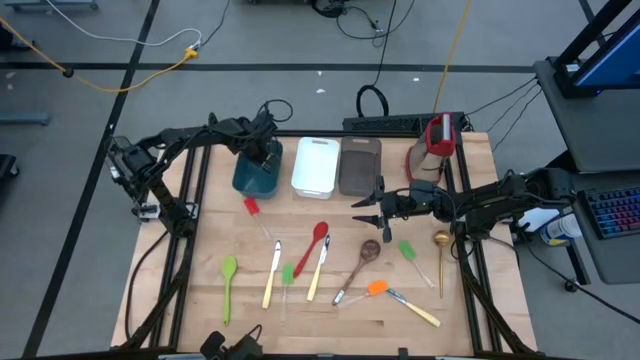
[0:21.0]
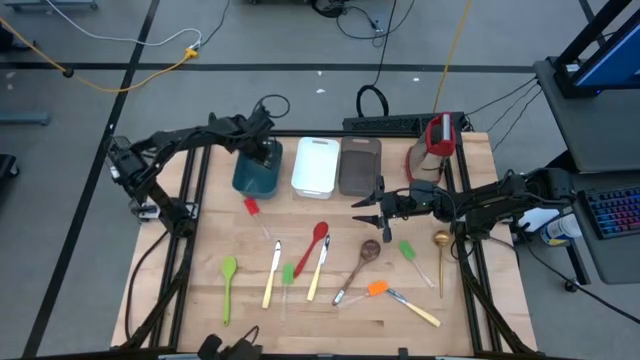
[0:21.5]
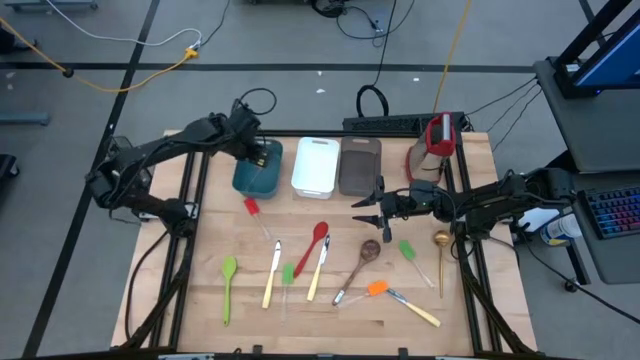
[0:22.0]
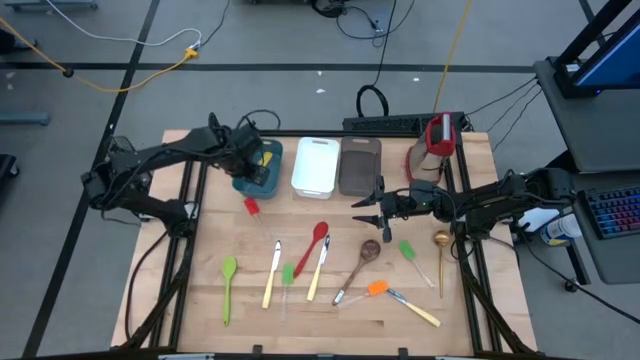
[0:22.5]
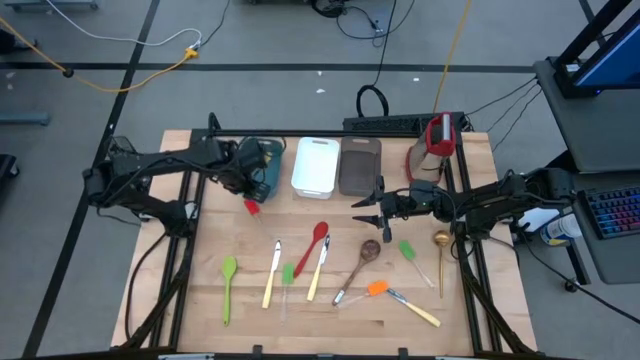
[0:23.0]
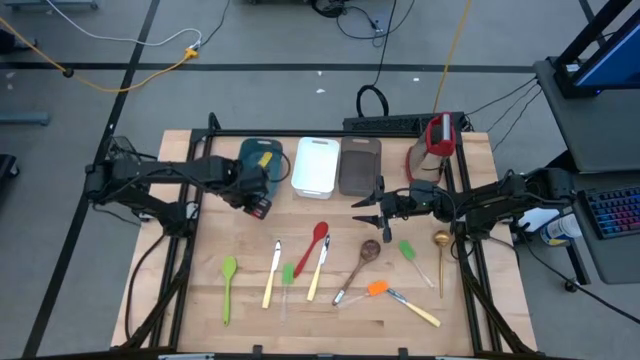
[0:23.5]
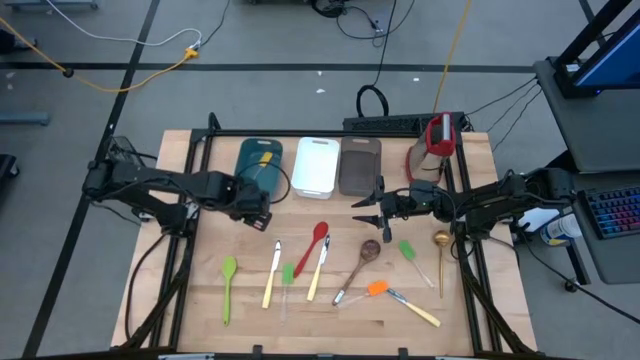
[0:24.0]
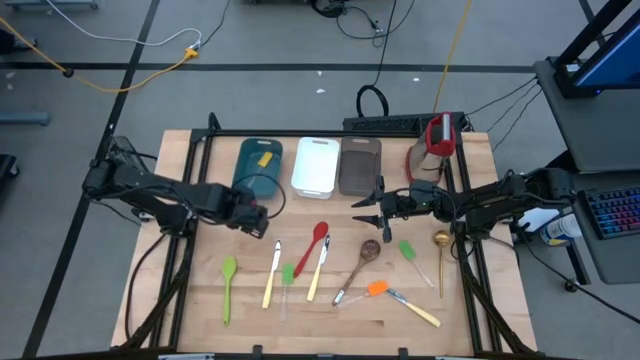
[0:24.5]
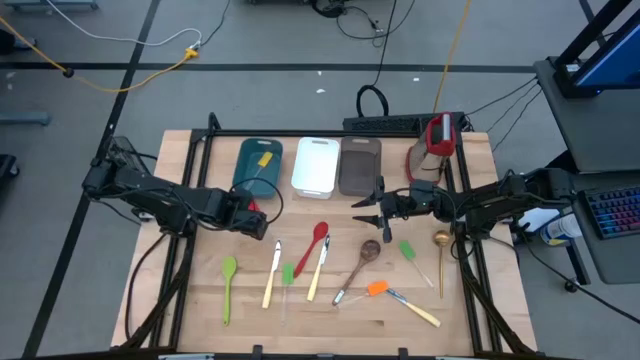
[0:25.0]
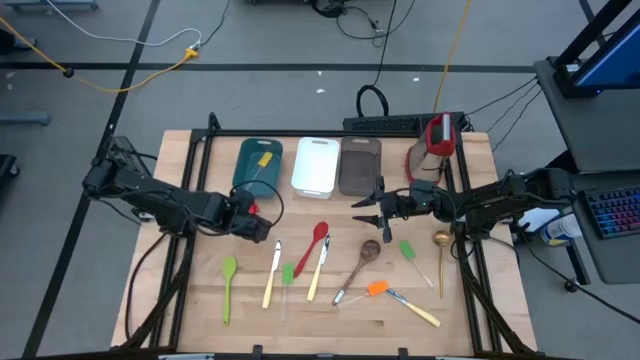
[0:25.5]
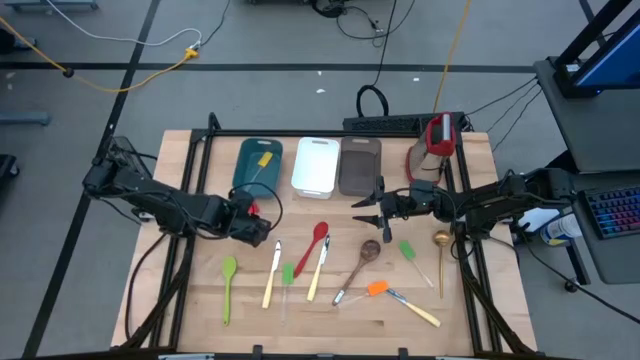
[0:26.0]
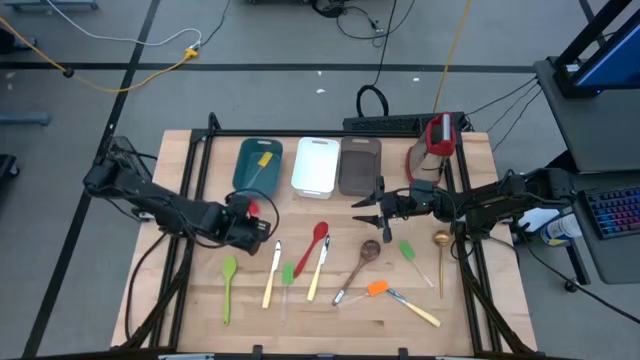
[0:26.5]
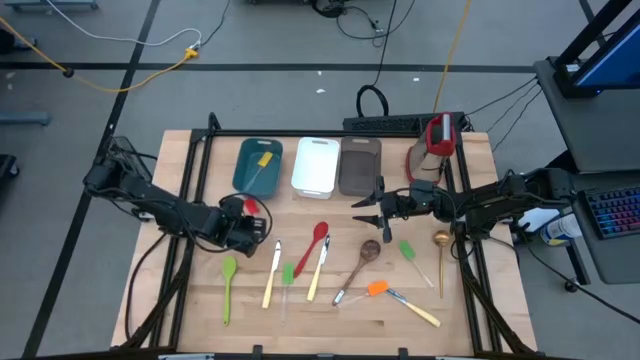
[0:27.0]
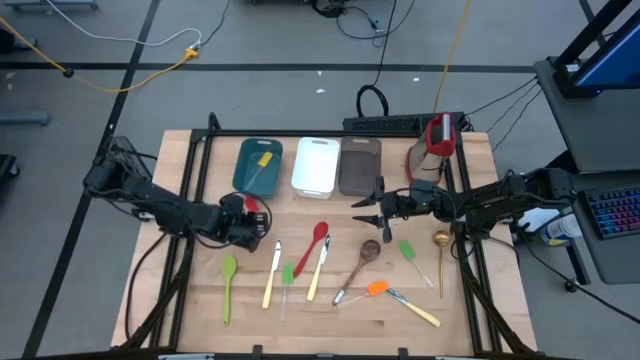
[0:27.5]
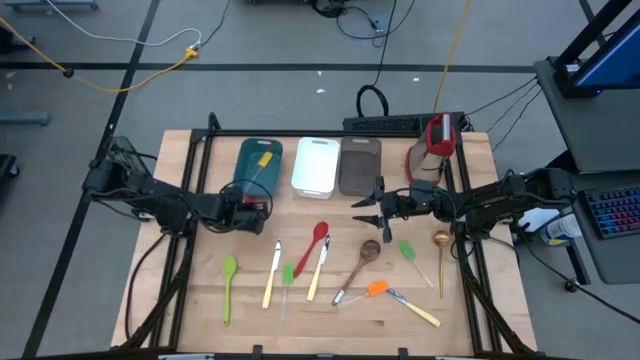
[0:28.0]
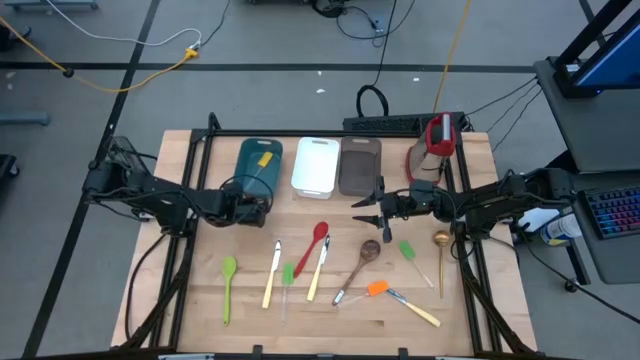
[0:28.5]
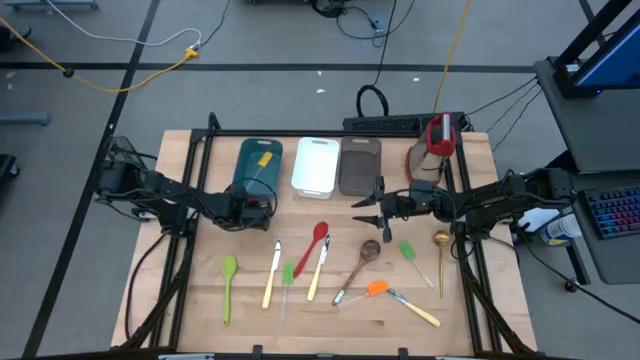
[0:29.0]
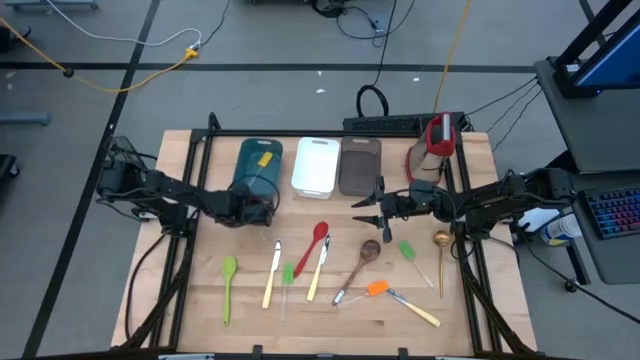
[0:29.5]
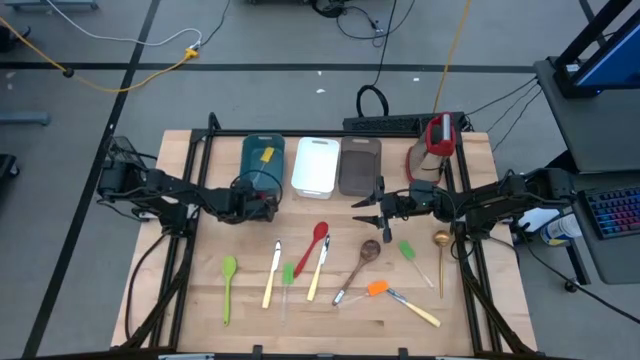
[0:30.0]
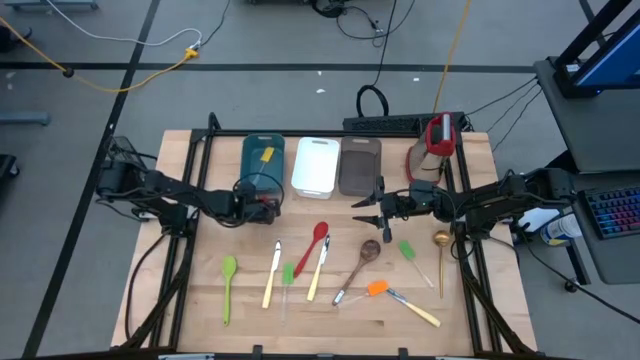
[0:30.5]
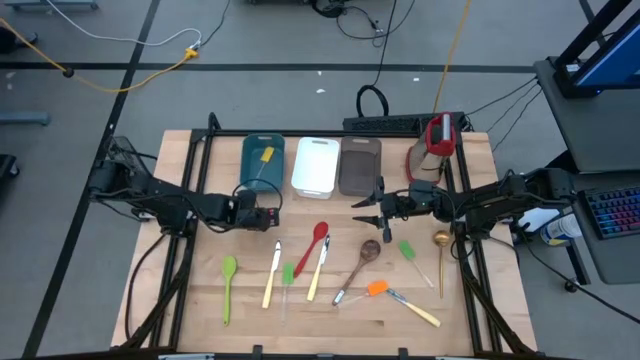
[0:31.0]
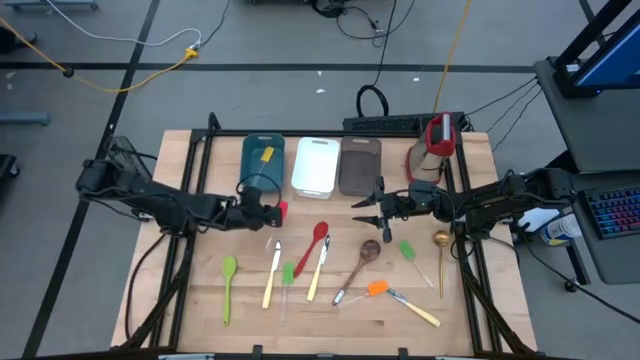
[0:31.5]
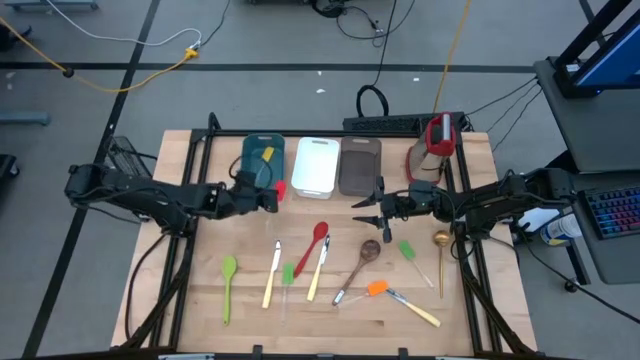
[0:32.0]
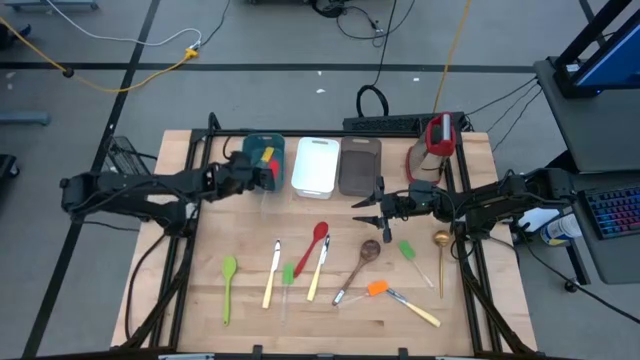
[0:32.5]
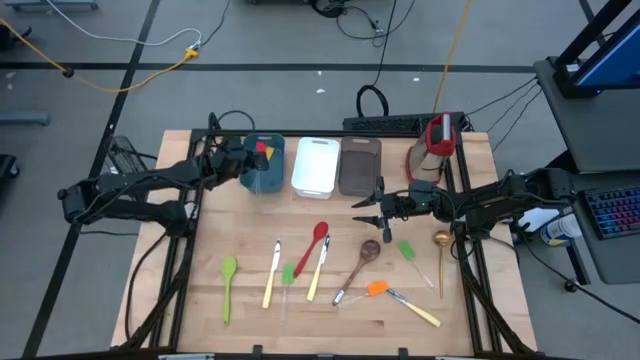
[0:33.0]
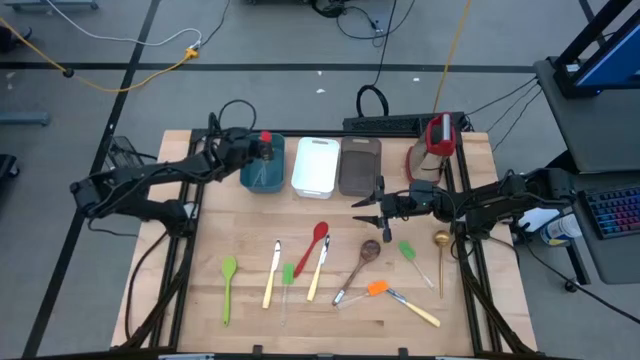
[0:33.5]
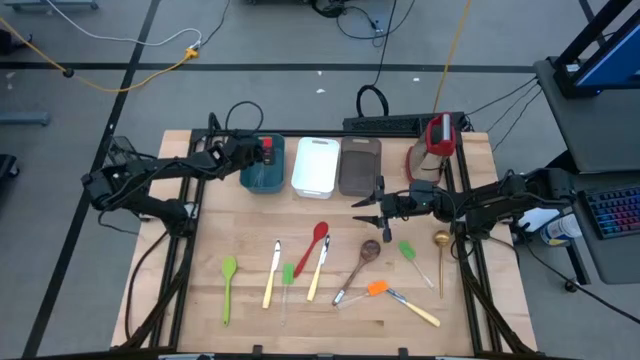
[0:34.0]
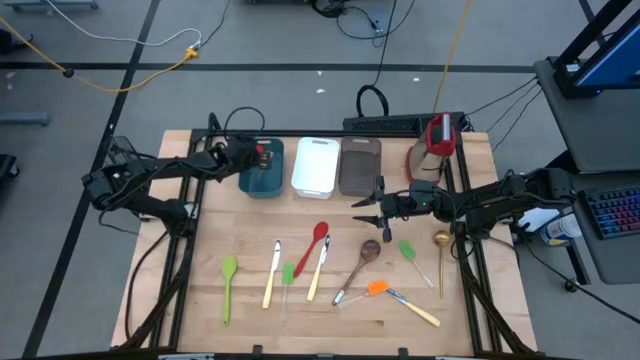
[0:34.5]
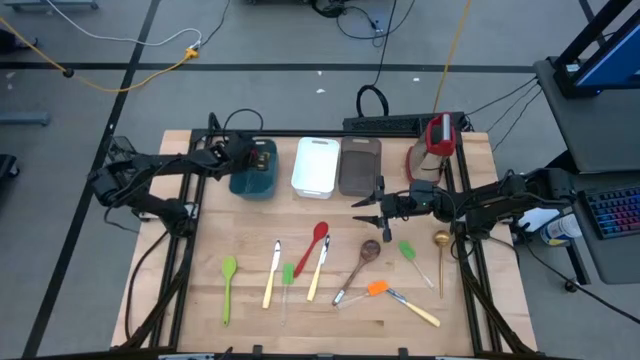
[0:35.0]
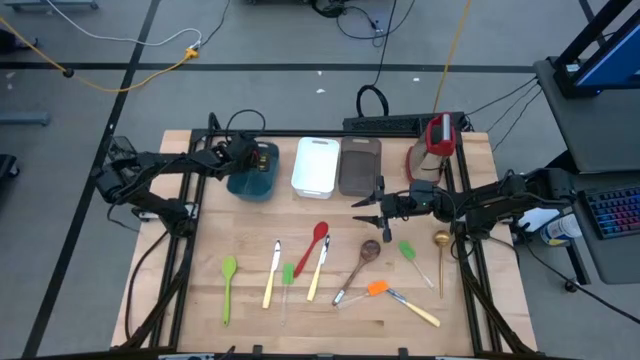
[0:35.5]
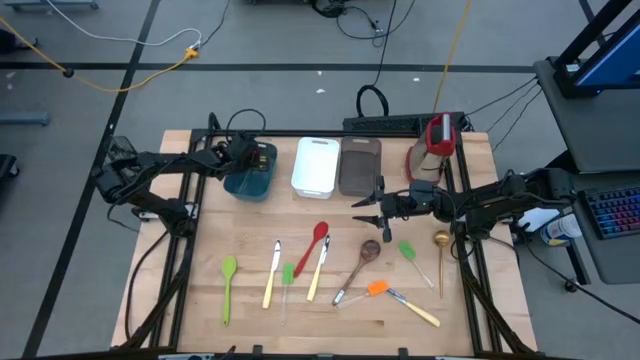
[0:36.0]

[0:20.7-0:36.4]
Task: Pick & Place Kitchen Items
Put the red spatula into the blue bin

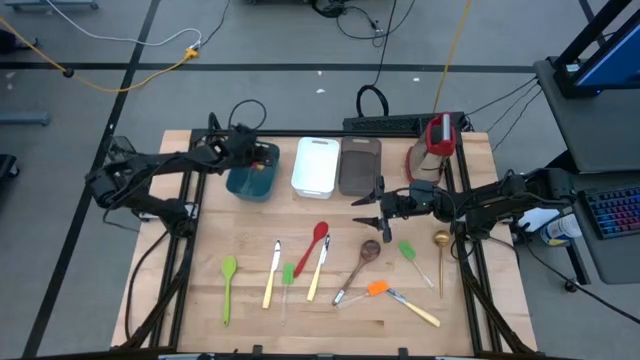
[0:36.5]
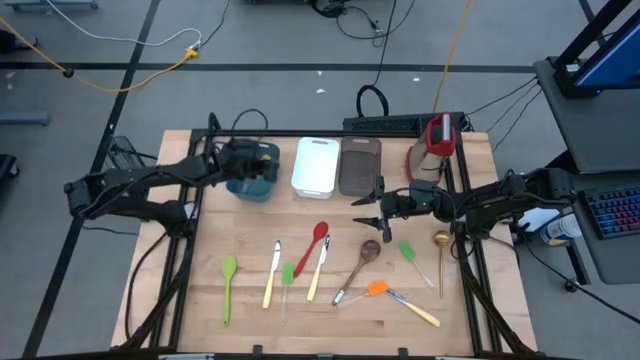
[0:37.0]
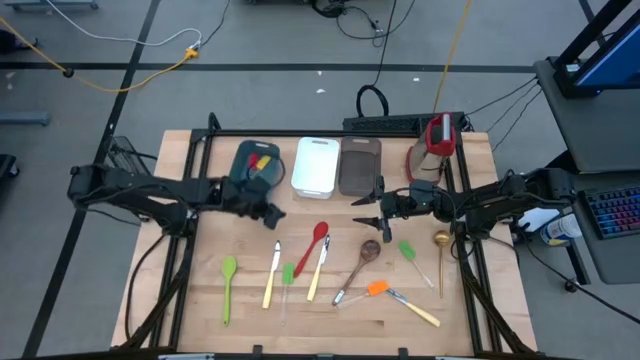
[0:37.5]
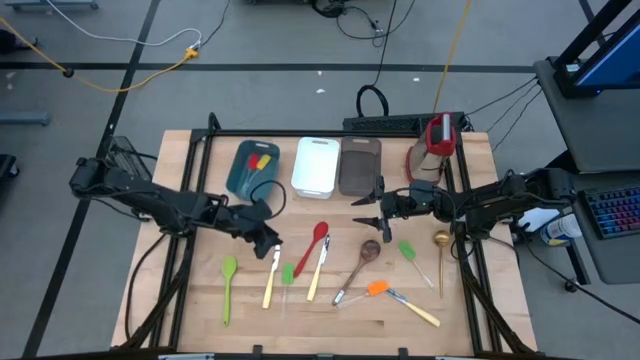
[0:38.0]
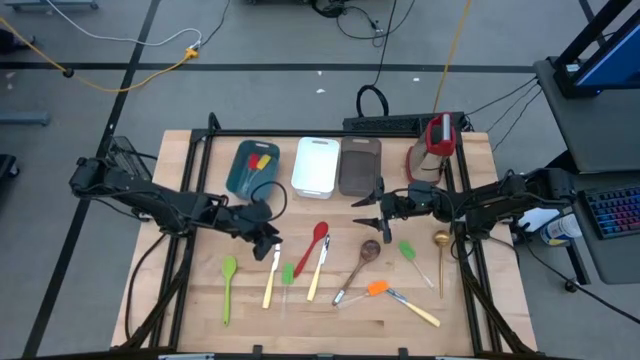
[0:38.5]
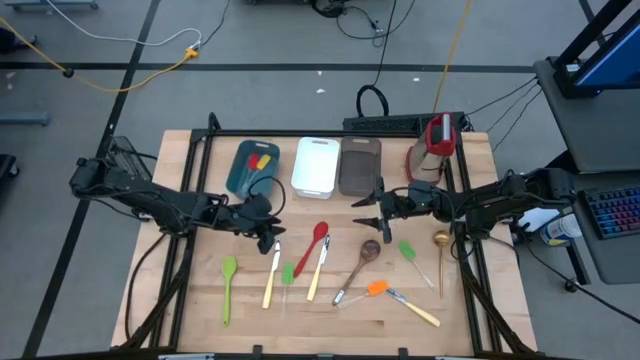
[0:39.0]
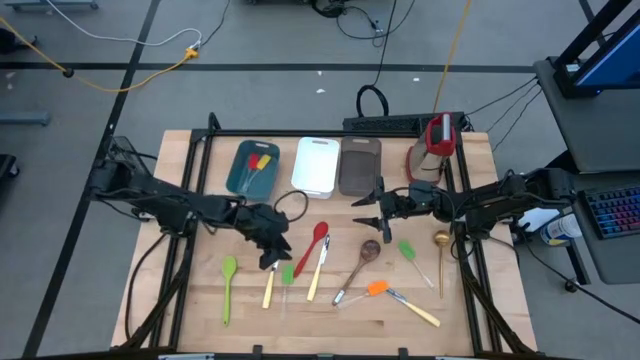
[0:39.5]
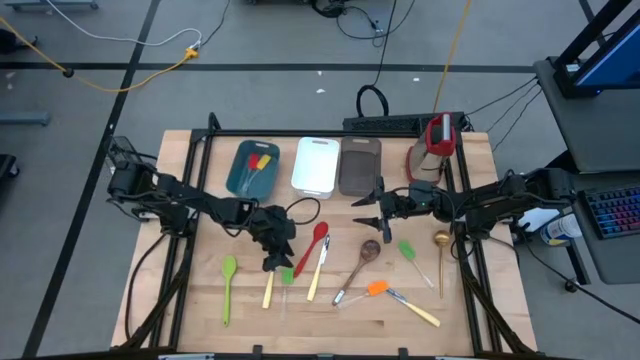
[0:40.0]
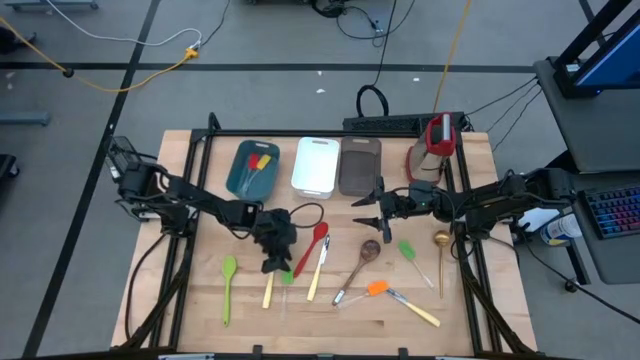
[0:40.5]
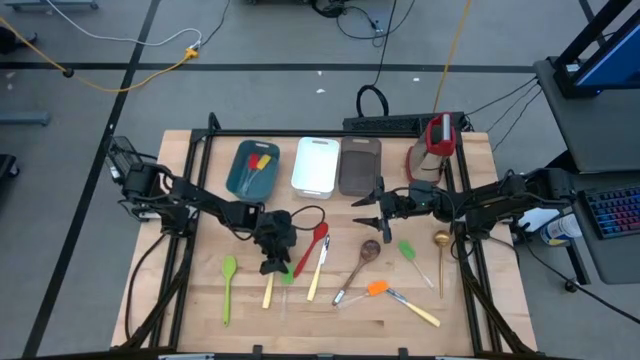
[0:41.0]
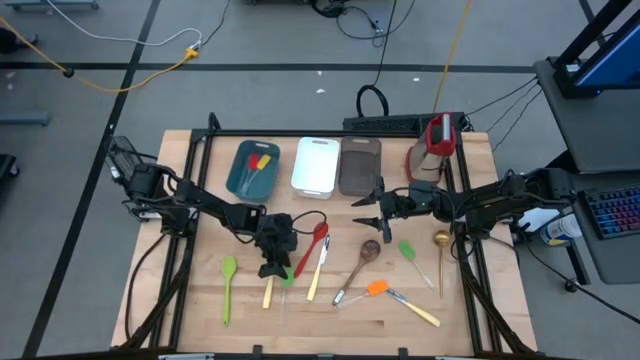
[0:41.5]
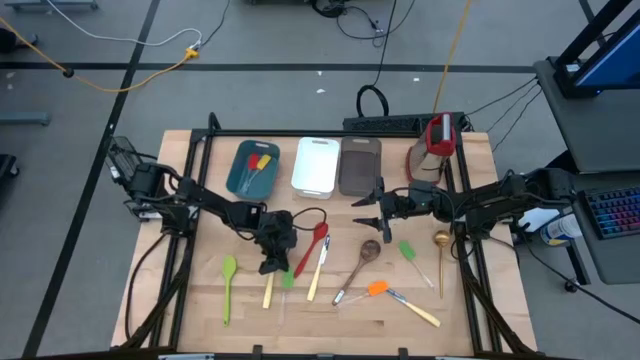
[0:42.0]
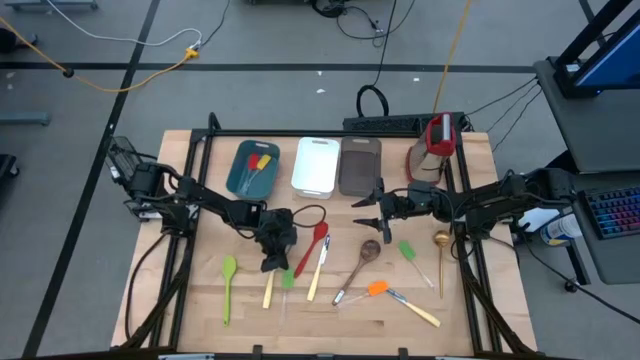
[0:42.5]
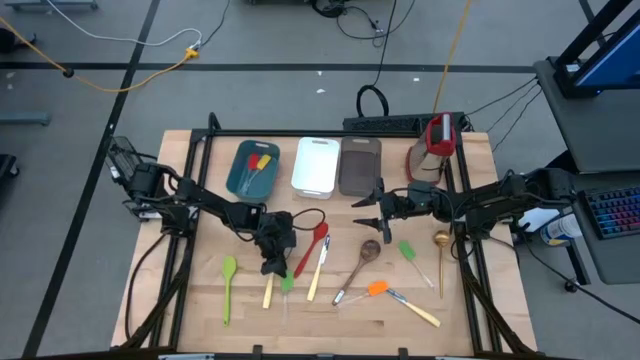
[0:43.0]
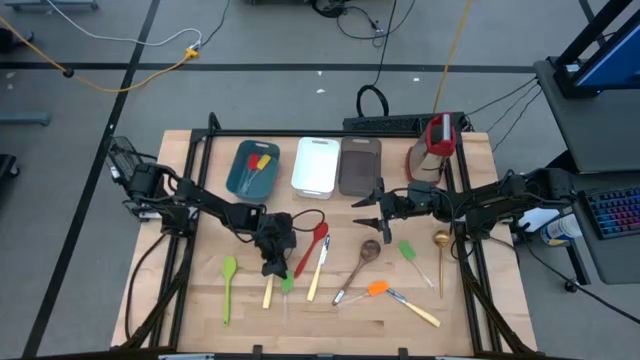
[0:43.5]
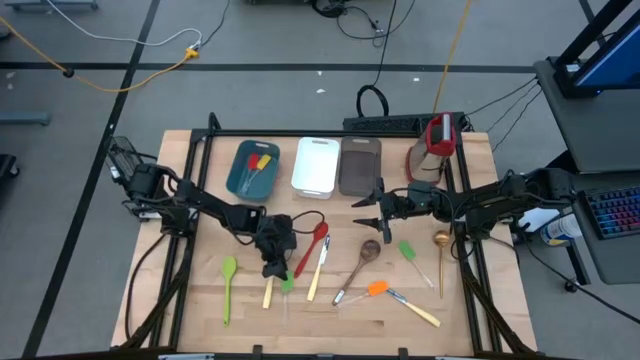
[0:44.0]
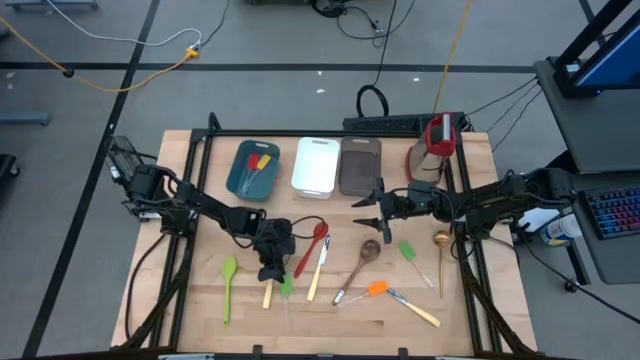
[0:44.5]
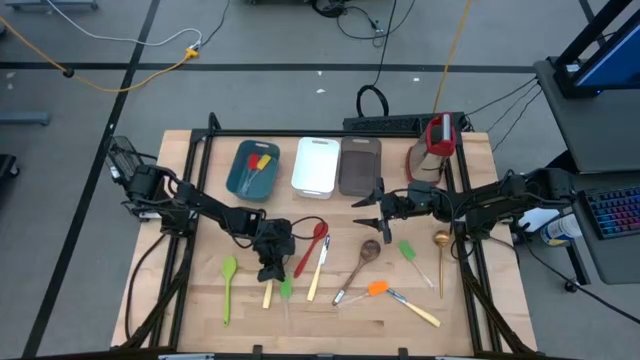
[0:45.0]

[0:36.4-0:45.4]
Put the left green spatula into the blue bin
